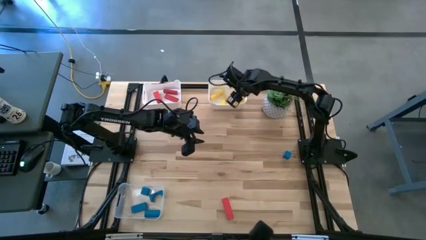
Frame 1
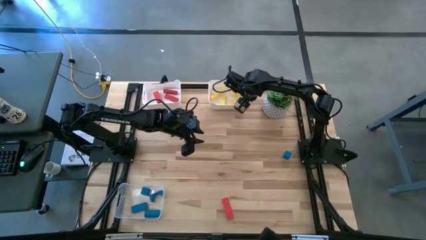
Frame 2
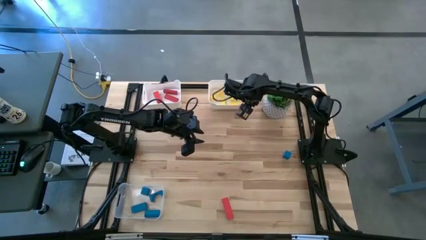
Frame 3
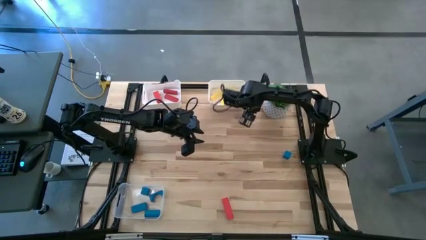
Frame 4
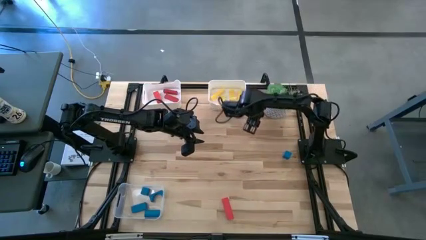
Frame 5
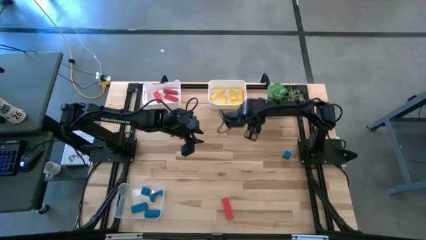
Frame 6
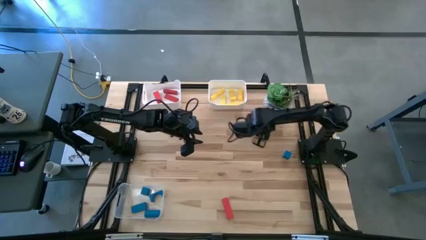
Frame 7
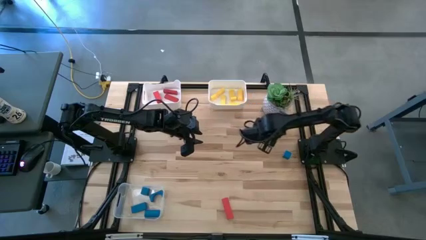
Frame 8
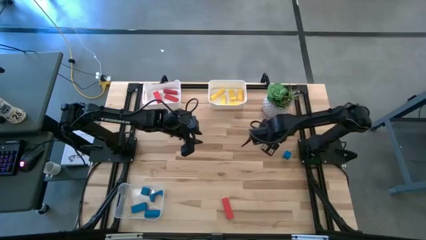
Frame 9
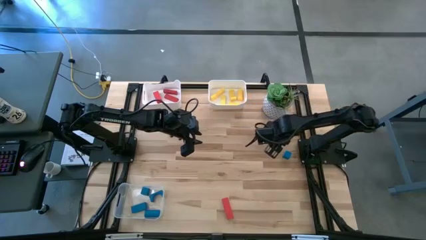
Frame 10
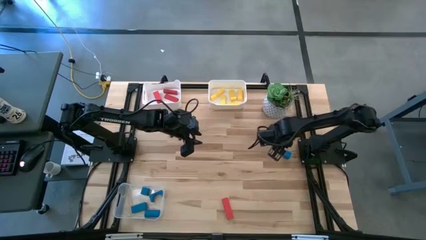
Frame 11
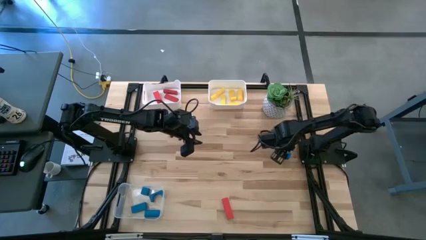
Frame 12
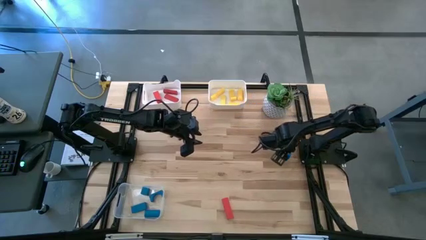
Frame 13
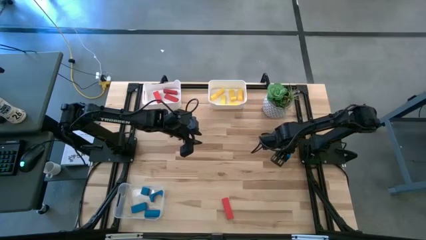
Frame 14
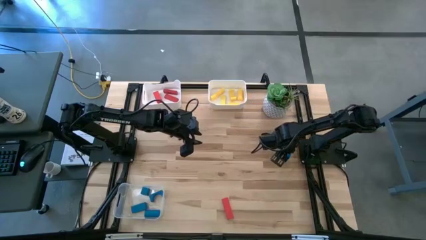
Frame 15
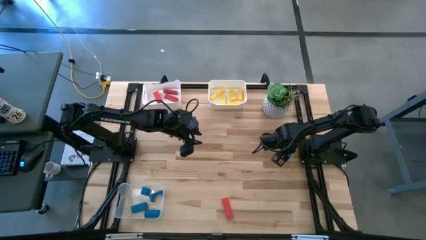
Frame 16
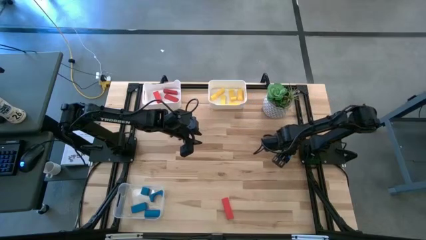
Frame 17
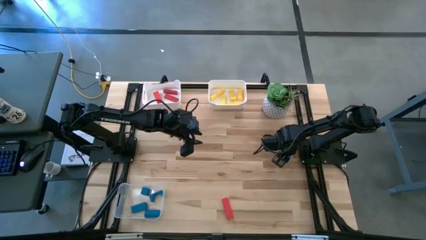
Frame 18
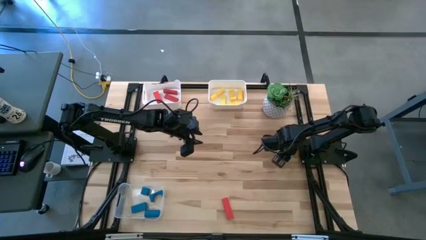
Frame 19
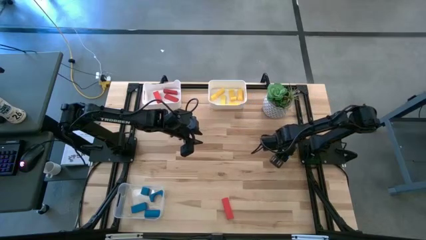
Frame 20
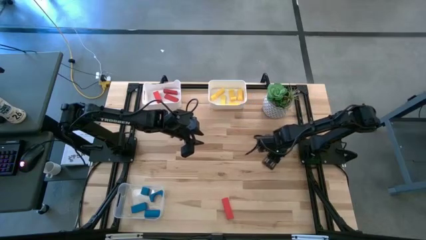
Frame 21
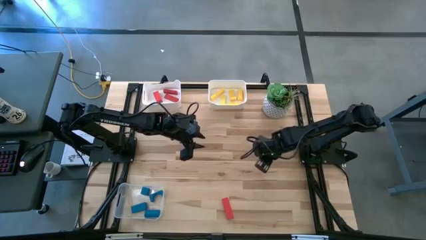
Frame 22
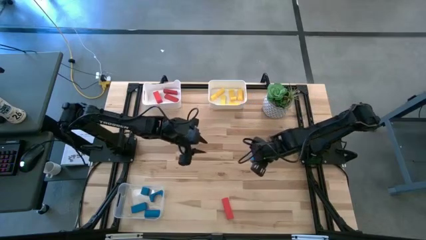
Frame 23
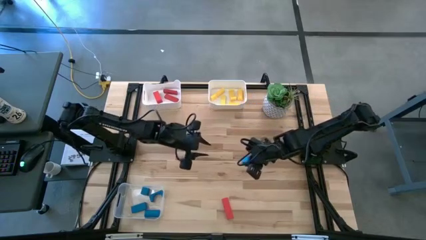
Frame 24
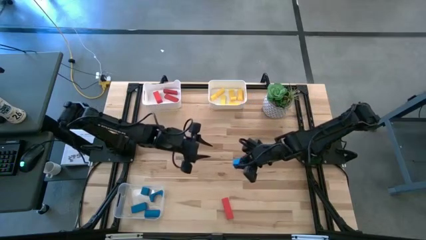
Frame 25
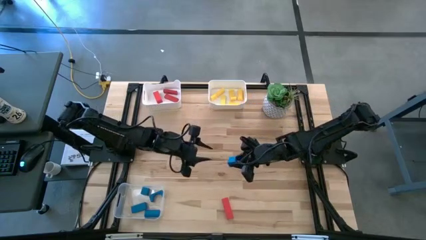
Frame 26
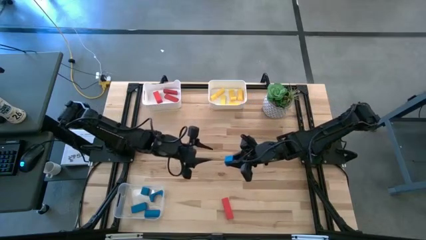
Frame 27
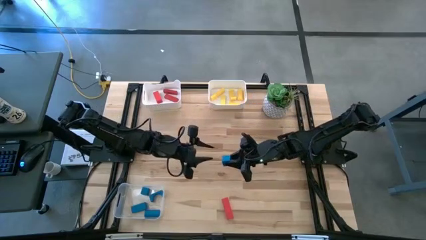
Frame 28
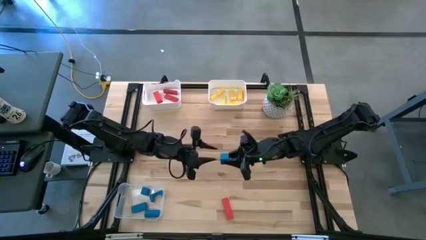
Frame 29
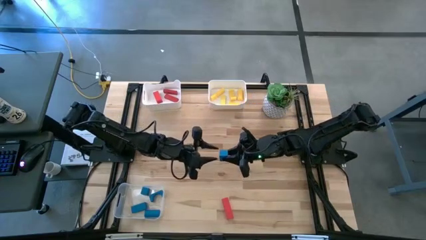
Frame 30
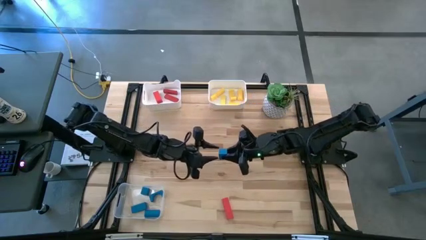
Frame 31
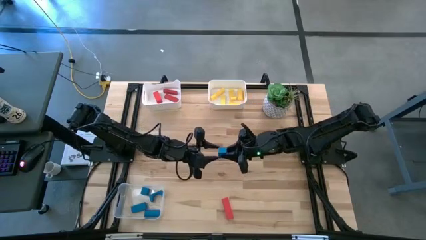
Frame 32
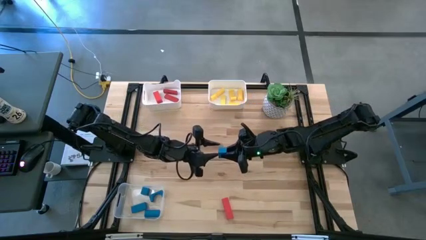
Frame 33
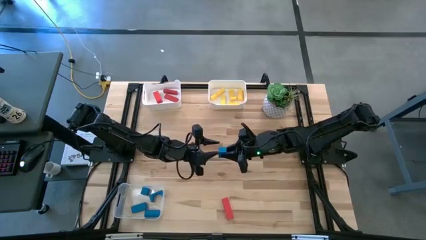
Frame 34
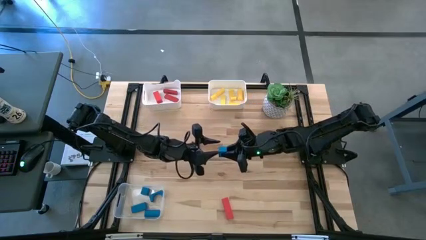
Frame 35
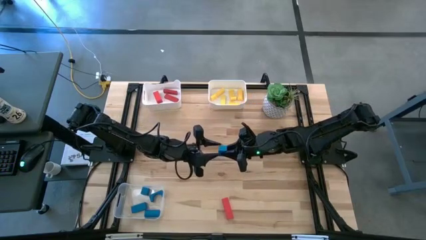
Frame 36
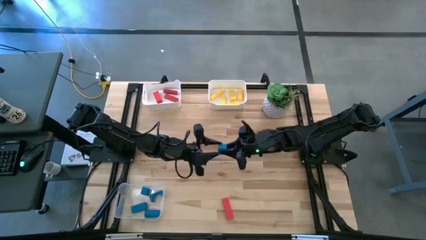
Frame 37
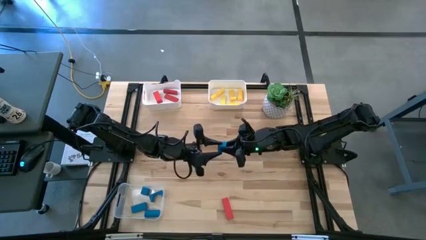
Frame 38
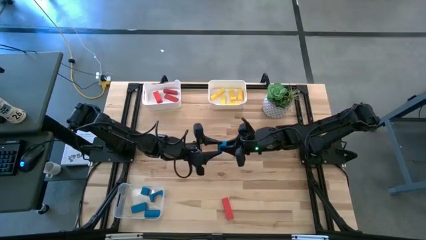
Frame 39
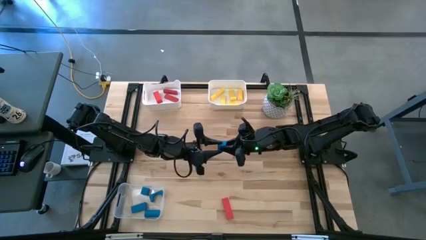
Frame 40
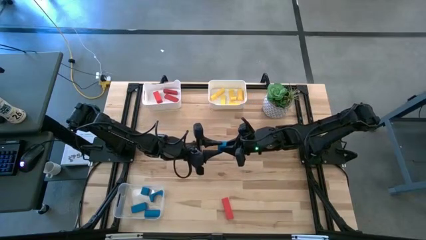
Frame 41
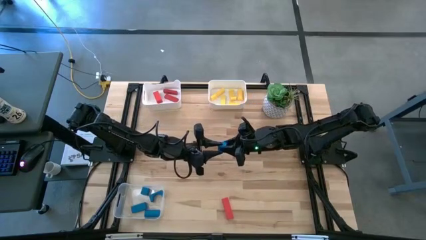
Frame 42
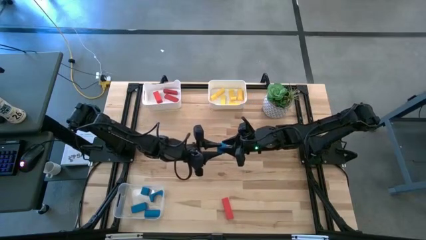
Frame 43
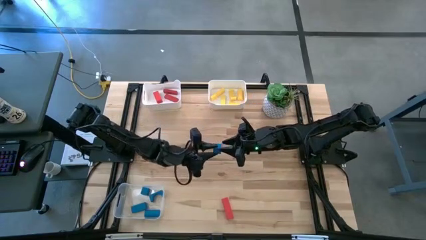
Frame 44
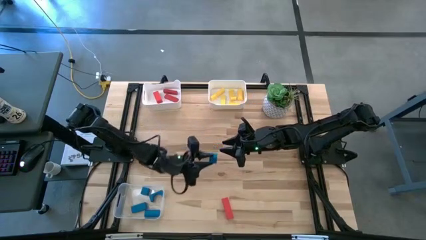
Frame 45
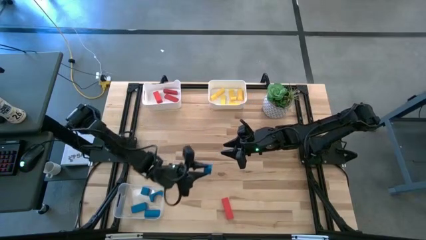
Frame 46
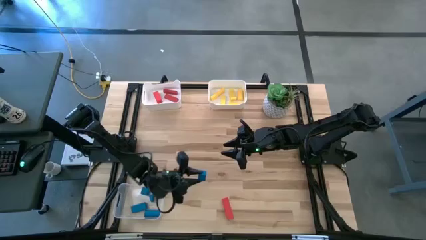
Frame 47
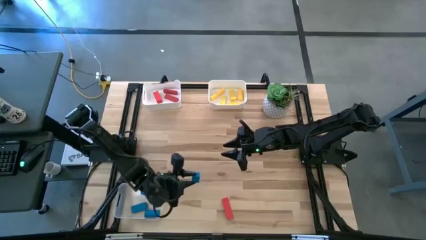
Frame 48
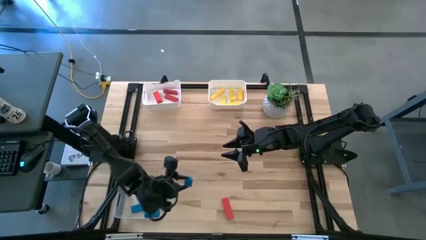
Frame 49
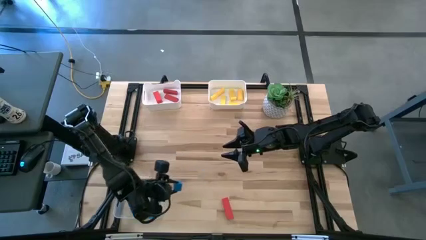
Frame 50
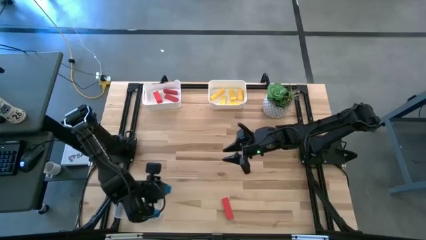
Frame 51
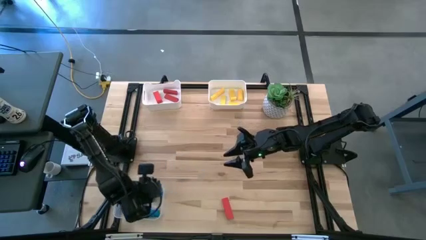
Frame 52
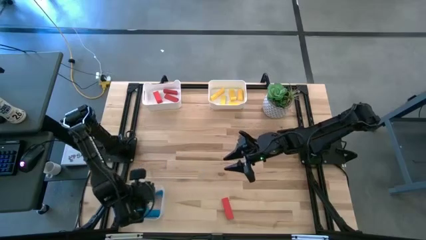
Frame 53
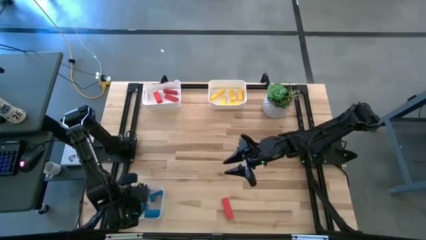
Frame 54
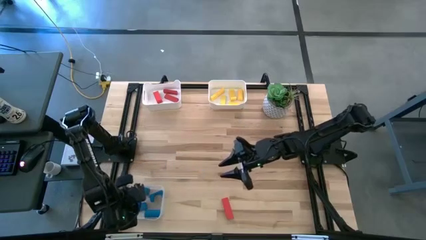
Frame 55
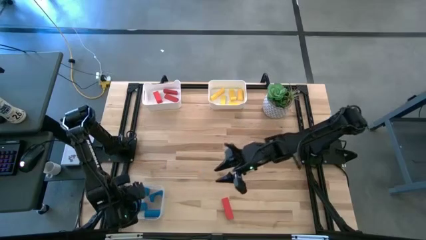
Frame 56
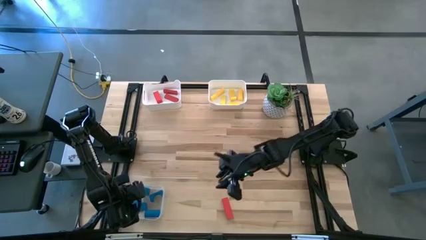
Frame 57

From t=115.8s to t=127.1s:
Task: Sort & place blocks by color
Put the blue block into the transparent bin

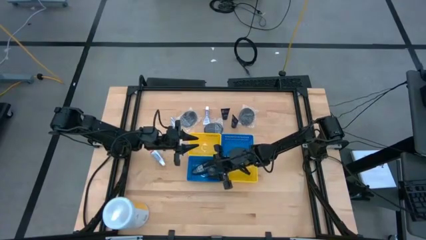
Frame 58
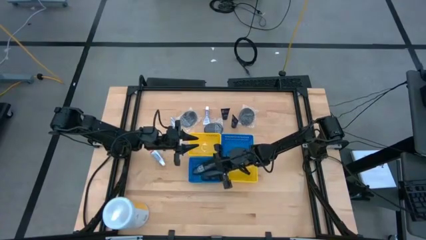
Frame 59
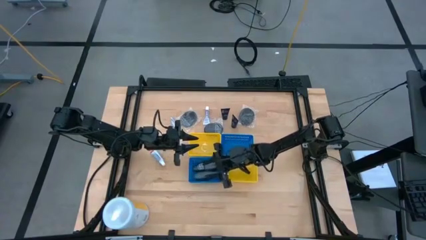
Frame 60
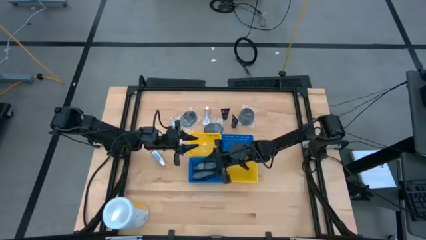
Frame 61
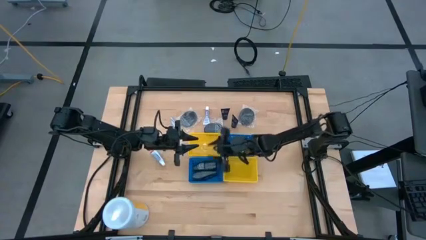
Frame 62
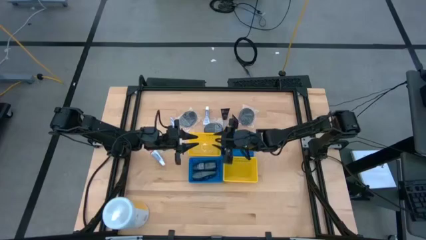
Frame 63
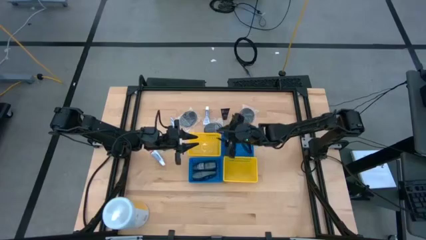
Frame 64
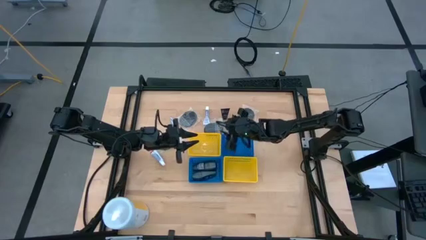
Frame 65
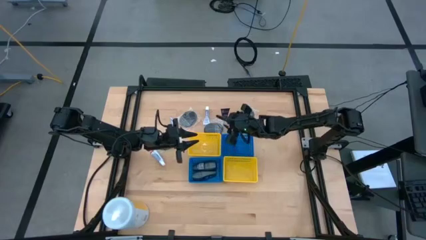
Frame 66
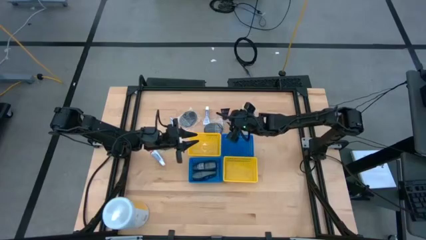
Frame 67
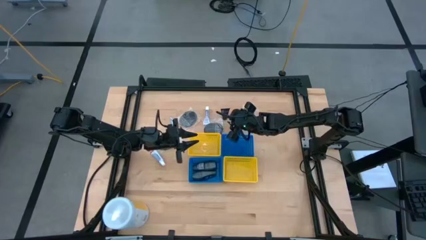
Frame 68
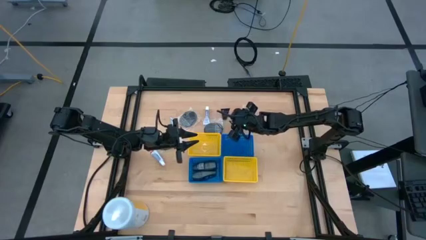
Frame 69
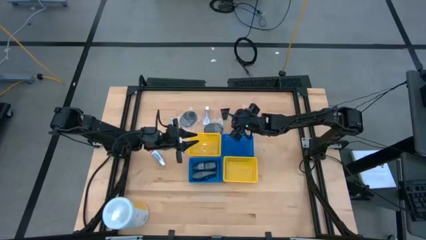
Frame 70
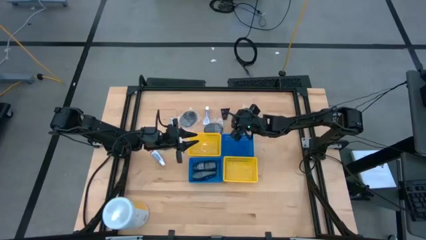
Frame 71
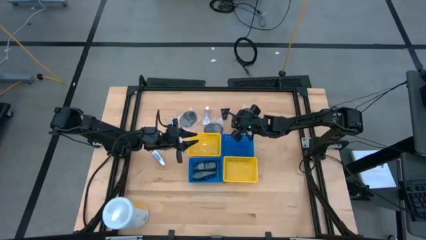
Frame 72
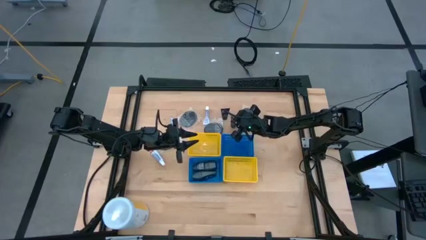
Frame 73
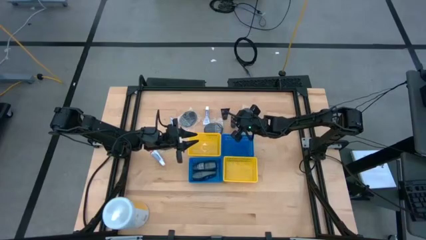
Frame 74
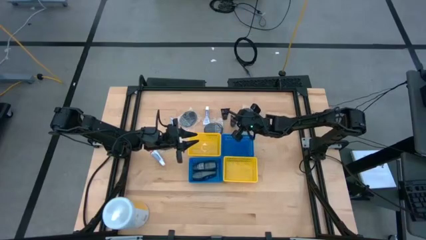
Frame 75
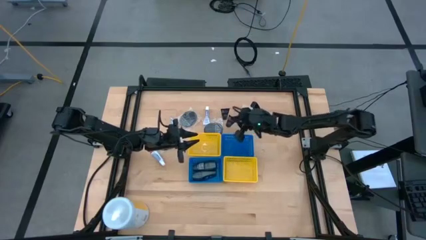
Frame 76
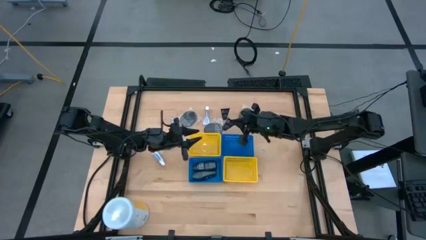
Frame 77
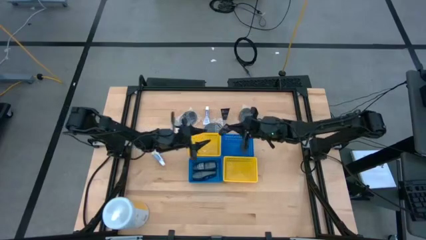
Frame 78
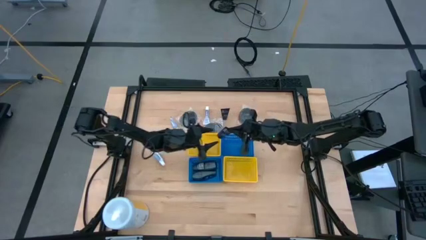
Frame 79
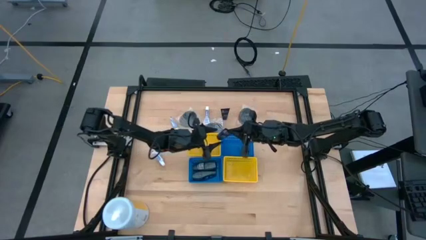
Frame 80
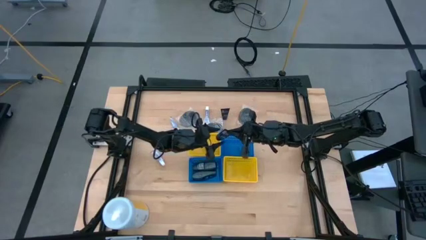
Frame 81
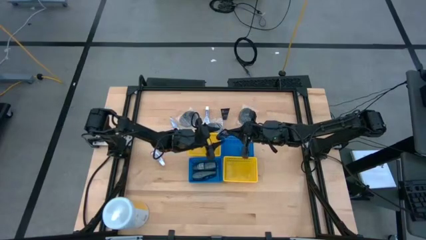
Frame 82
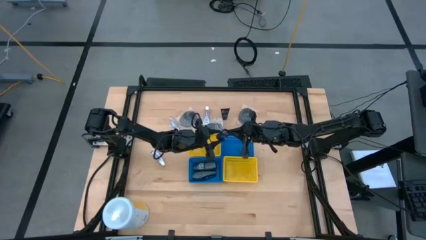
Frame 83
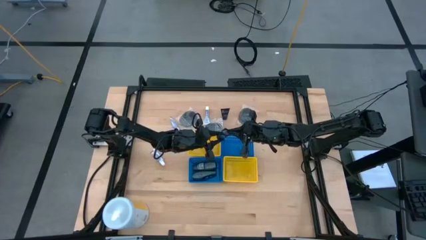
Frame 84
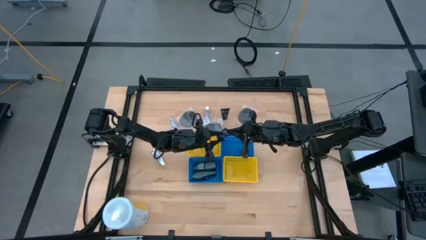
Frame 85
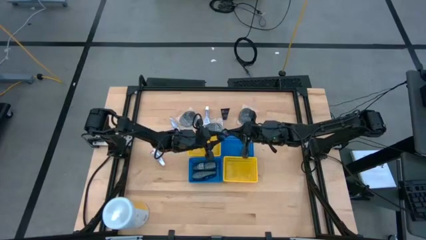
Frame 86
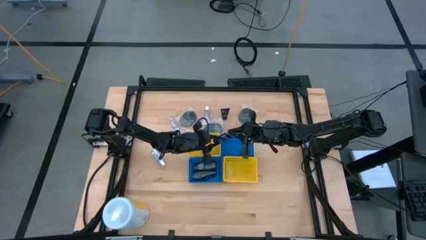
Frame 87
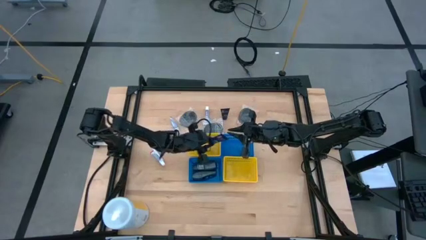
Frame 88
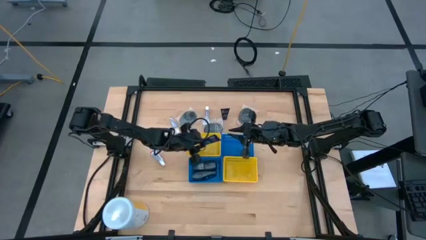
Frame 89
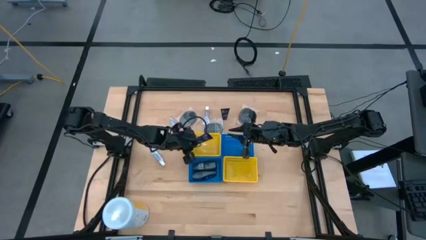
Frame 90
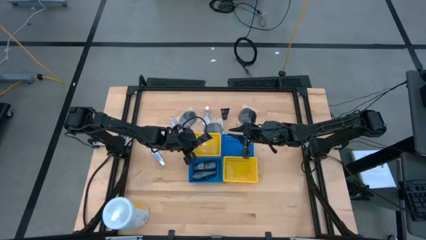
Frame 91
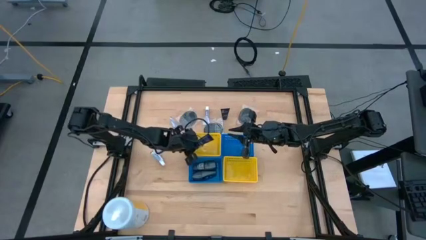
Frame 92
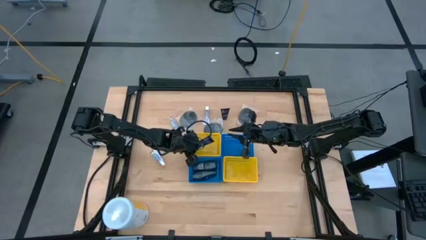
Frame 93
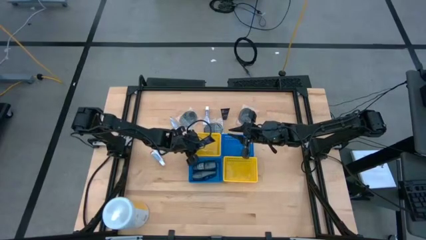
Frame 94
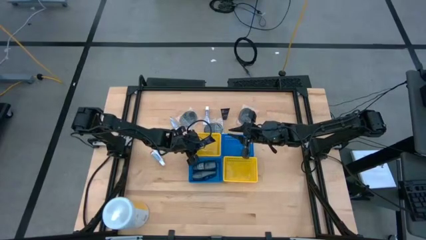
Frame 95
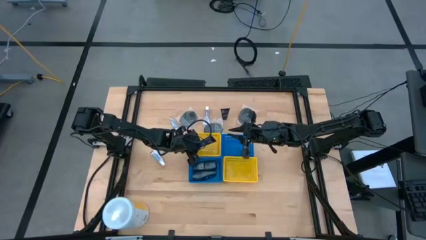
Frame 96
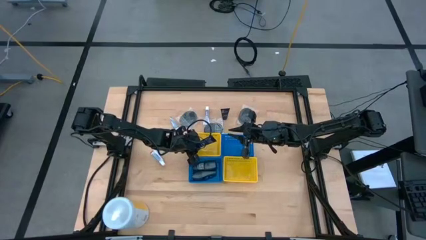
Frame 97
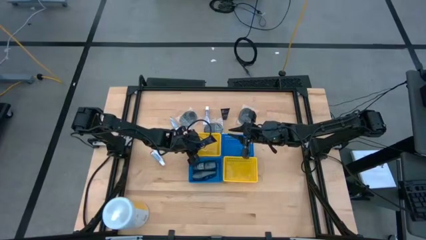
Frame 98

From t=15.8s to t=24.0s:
Task: Pick & Place Travel size toiletries
Put the blue shave cream into the left yellow bin
